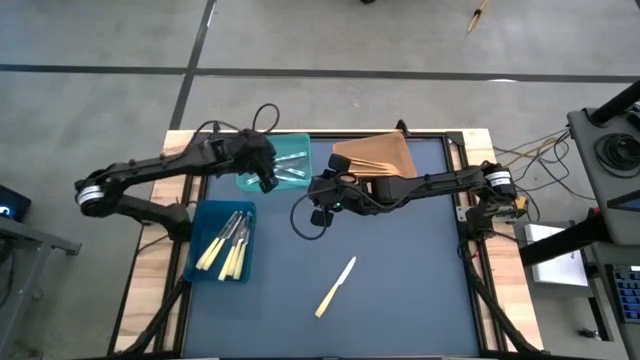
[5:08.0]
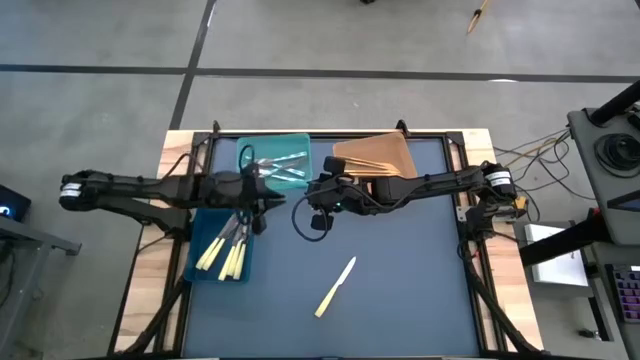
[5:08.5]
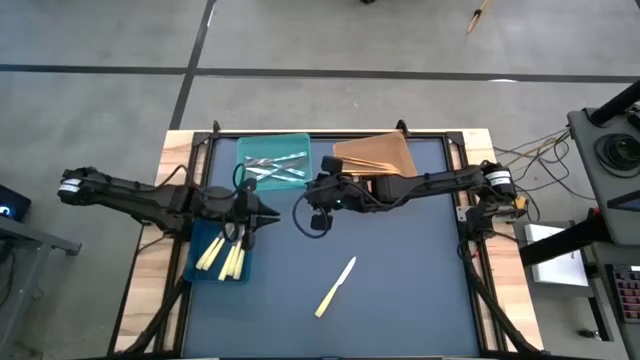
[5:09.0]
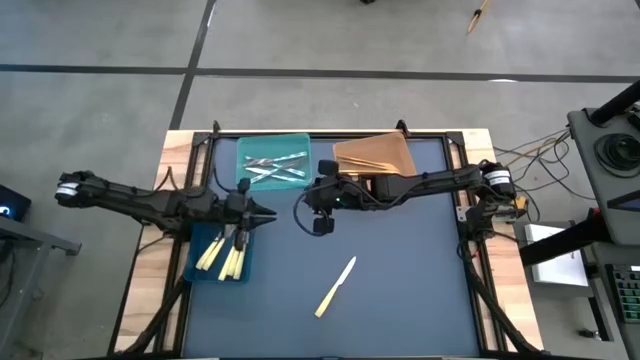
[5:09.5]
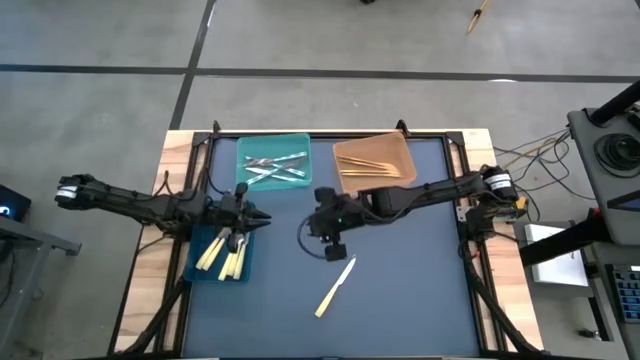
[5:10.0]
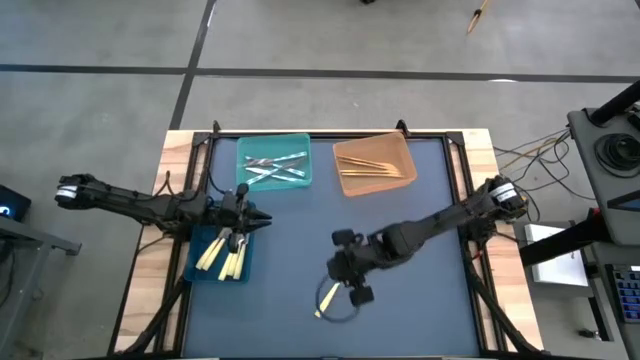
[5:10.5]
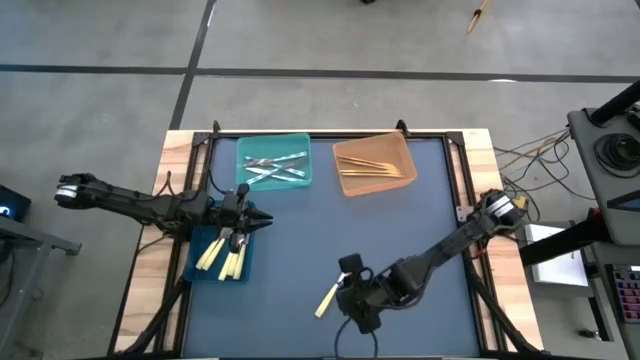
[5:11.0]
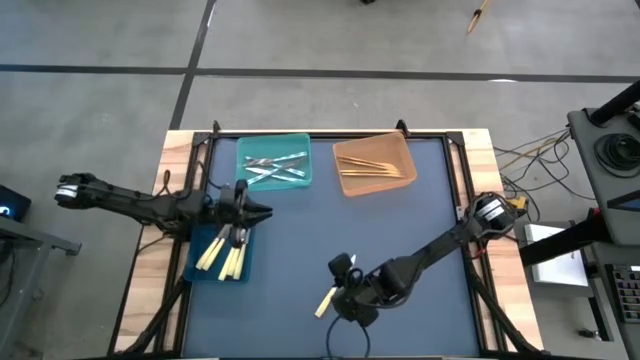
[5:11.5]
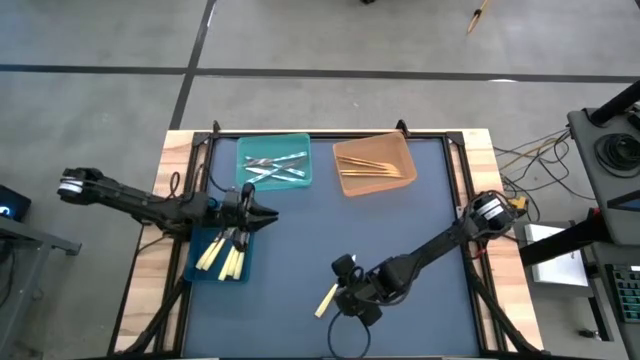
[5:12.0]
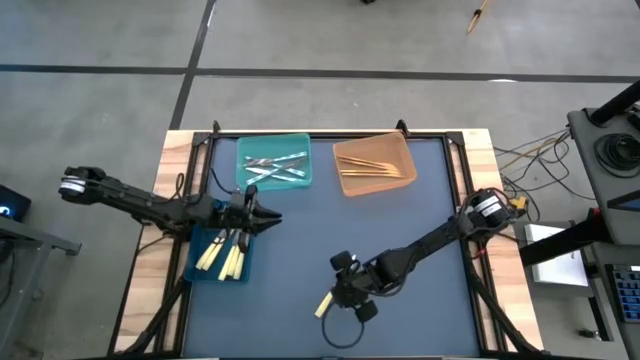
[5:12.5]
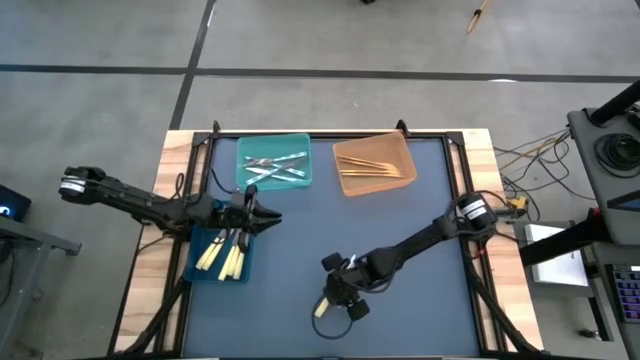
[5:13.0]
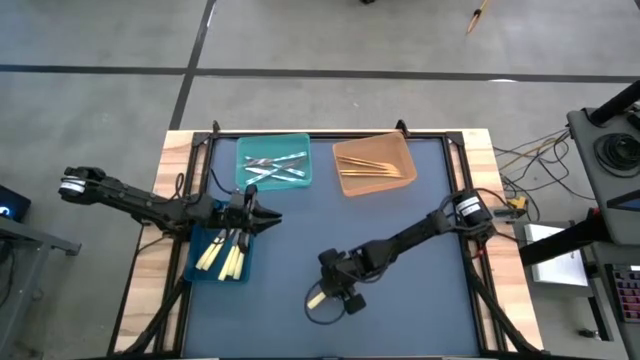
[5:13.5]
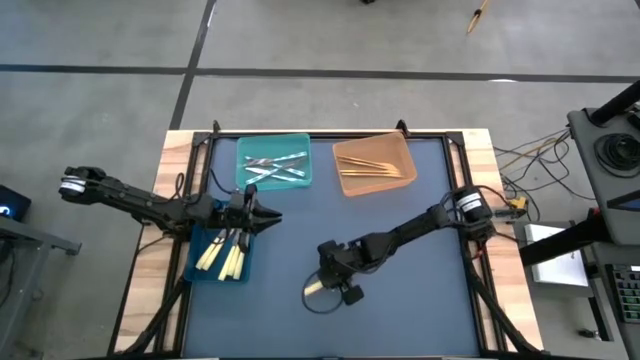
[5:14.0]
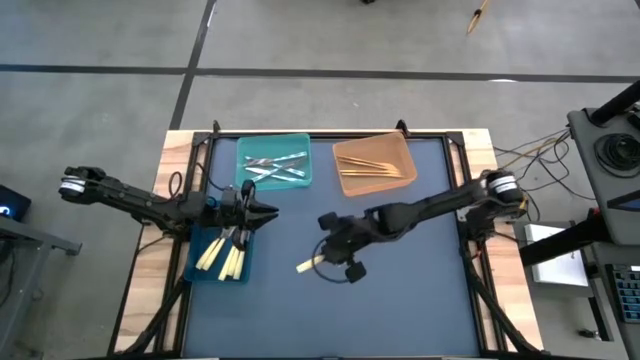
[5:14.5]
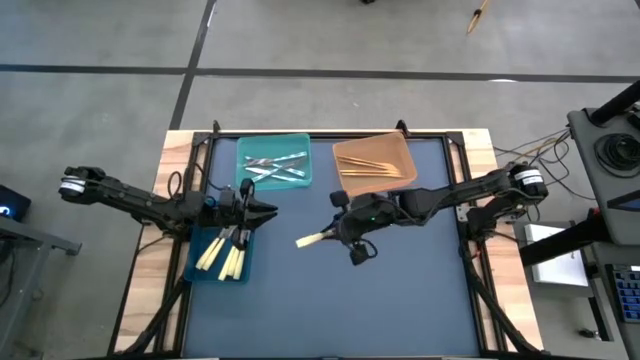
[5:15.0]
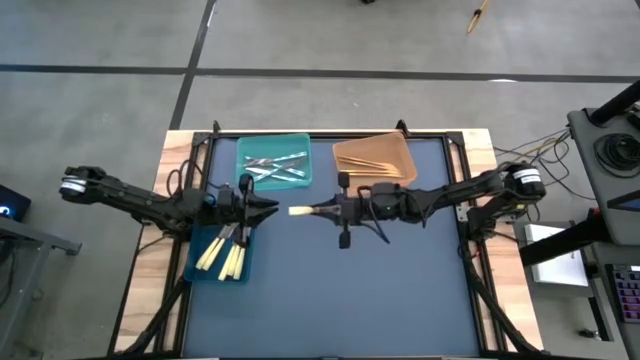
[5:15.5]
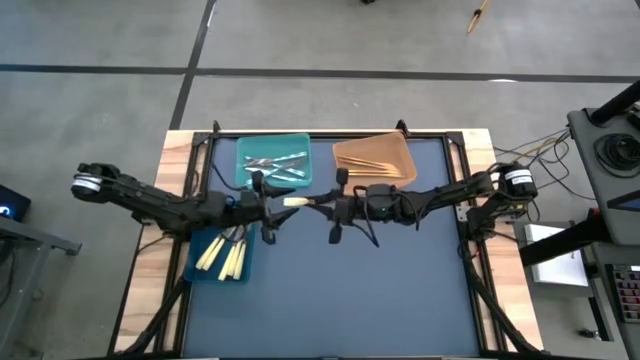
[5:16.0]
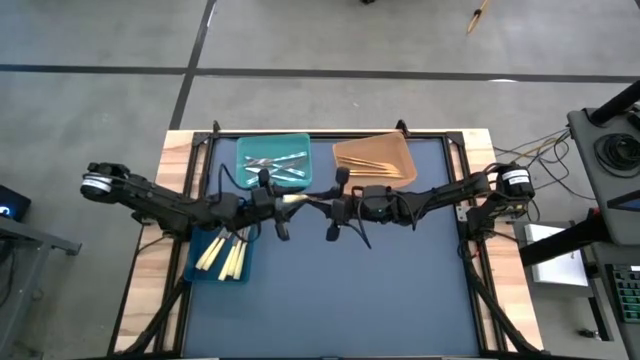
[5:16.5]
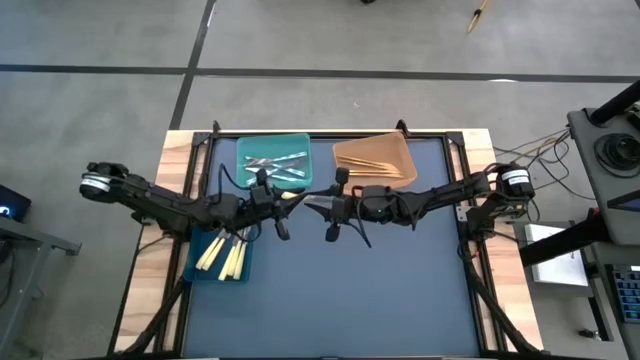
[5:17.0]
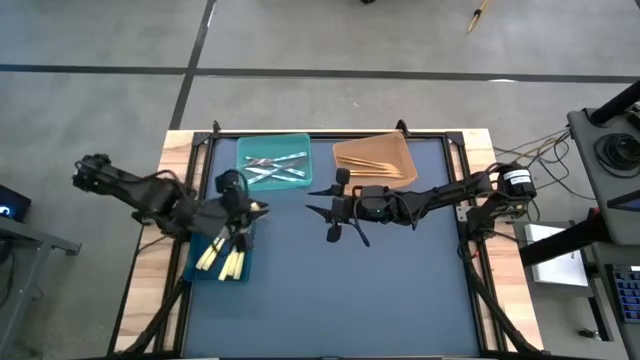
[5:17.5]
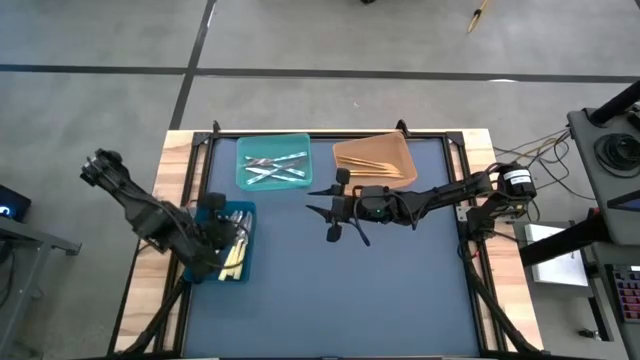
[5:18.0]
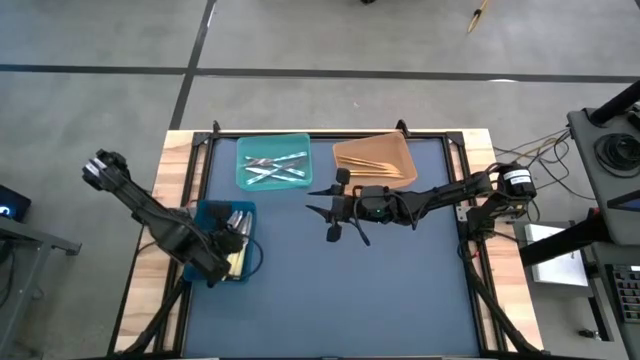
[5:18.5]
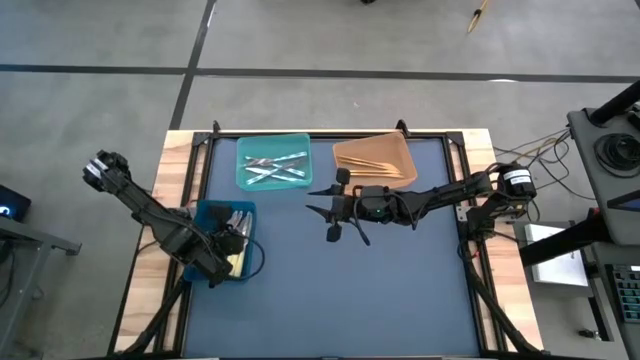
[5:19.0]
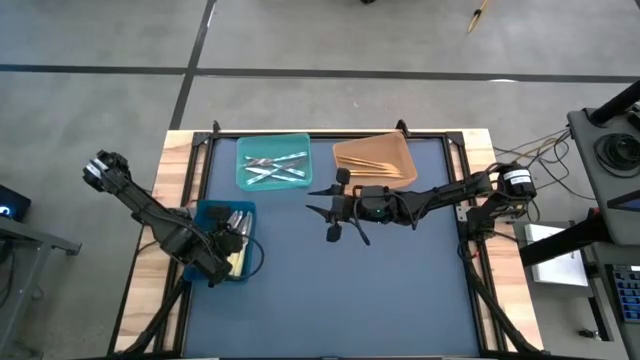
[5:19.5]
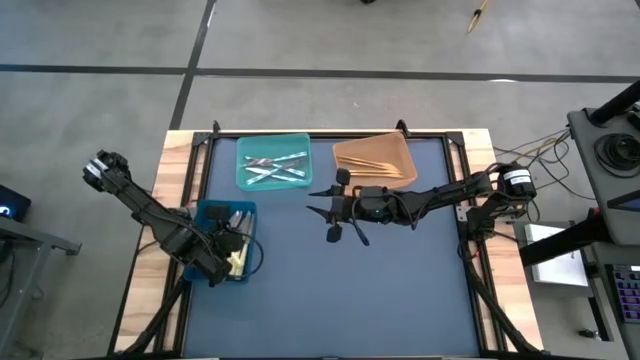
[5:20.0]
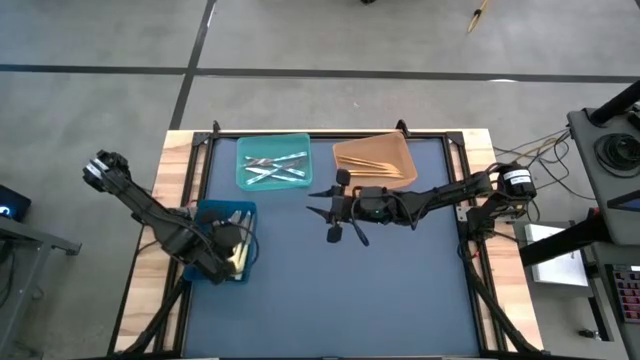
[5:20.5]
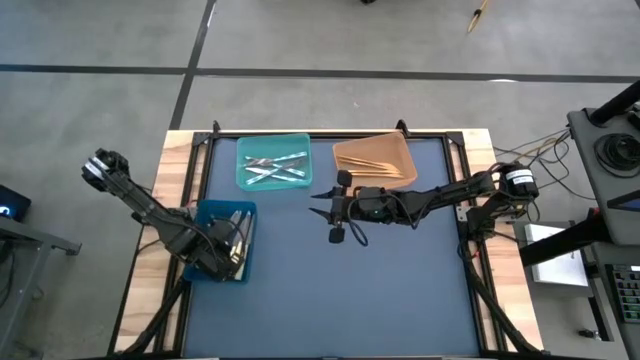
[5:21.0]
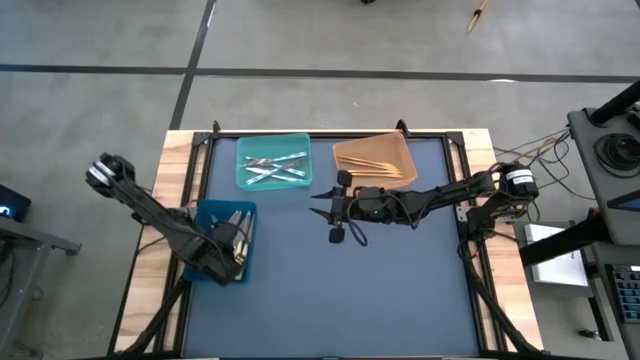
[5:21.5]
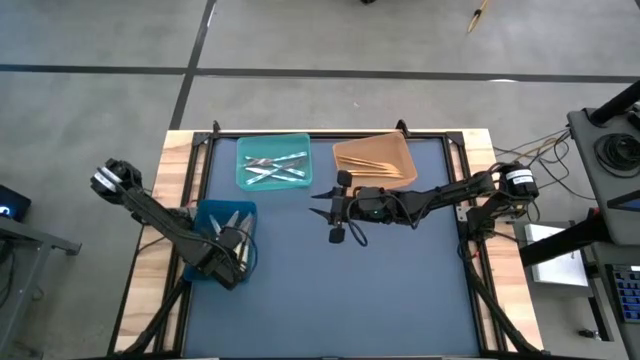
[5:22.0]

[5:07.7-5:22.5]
Task: Sort silverware by color (type)
Put the light yellow knife into the blue bin

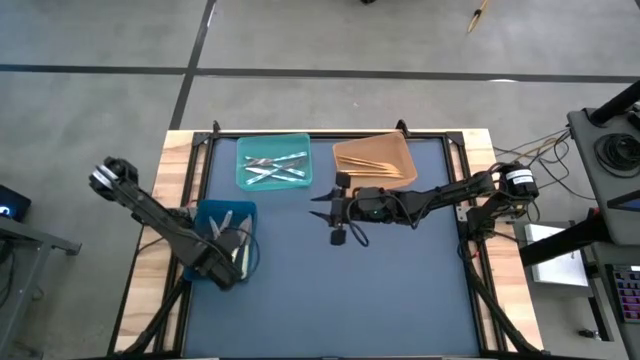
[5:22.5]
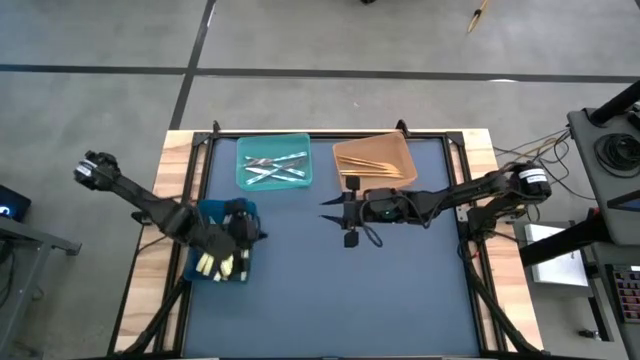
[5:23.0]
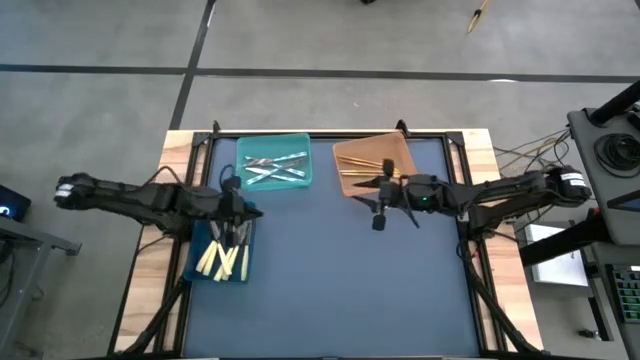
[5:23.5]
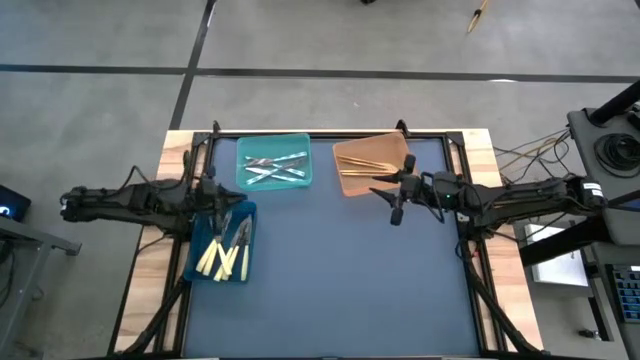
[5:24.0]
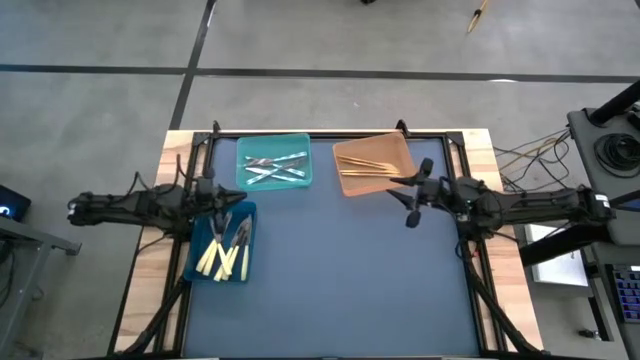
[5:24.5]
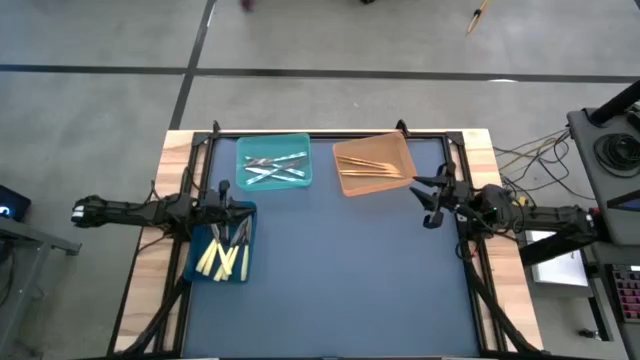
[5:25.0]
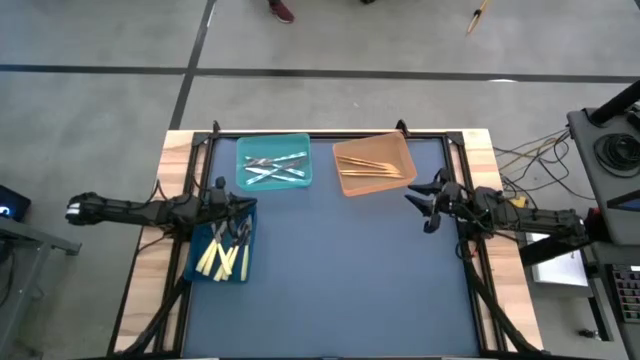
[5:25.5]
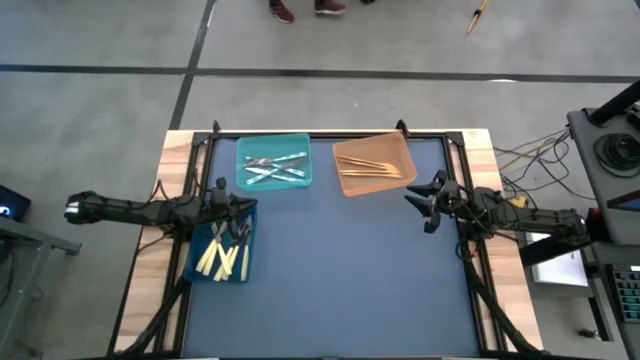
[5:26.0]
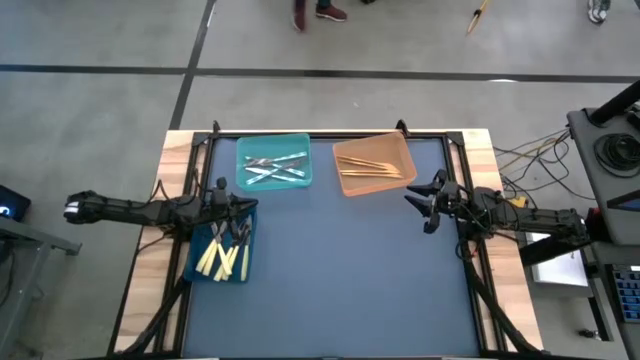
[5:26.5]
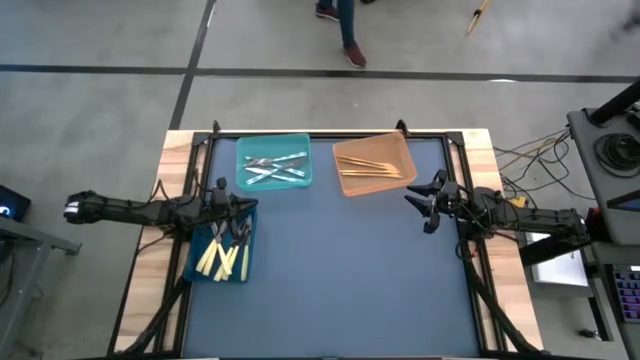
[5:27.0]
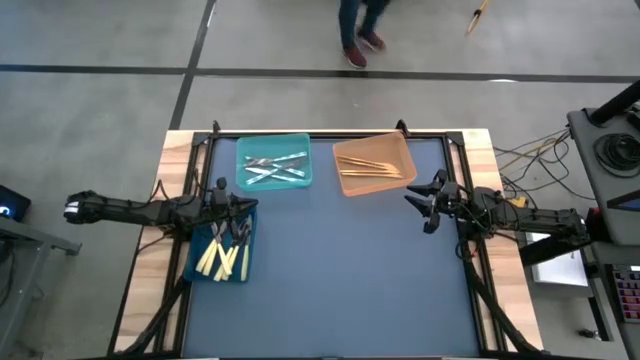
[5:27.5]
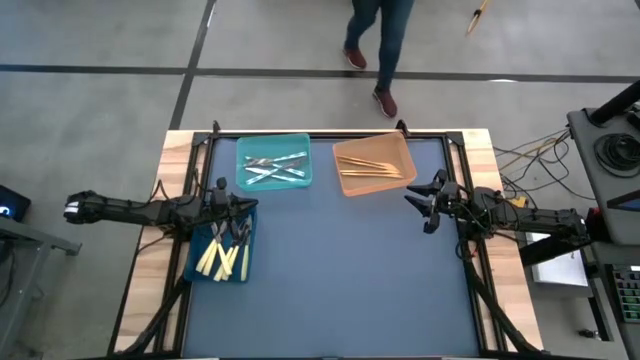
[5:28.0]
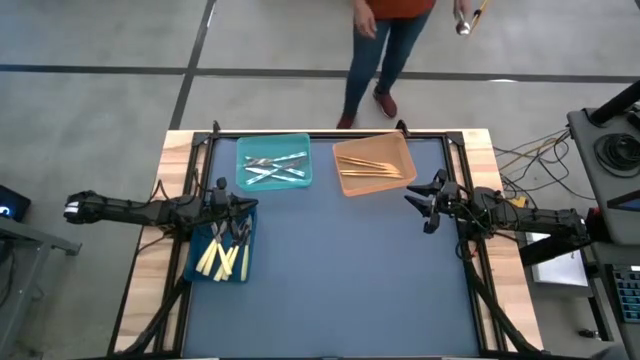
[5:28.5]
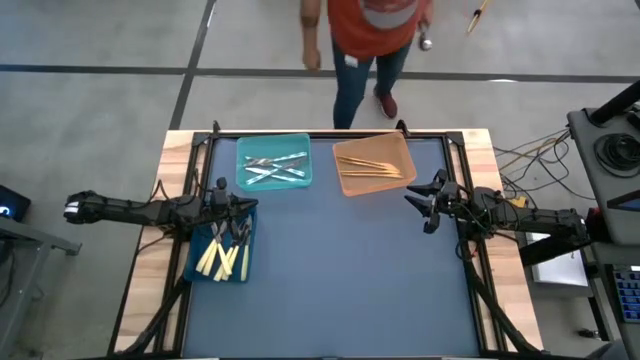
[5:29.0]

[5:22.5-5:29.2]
Return to Home Position
